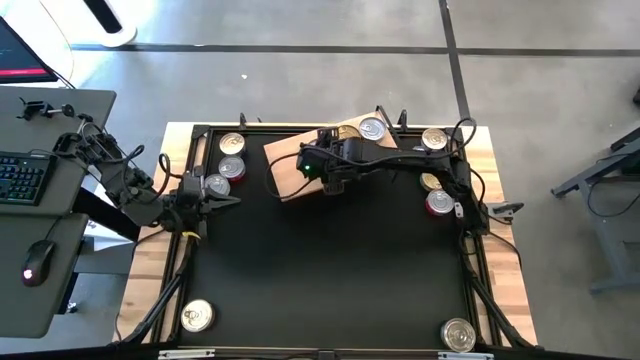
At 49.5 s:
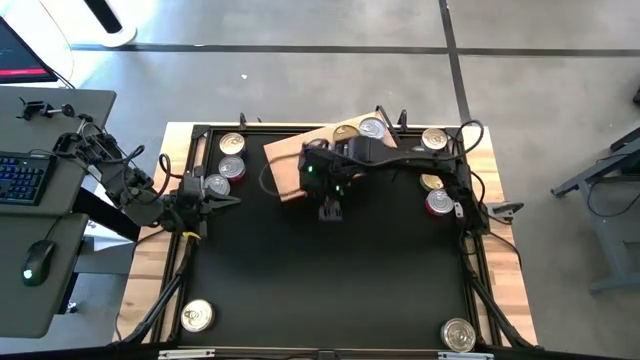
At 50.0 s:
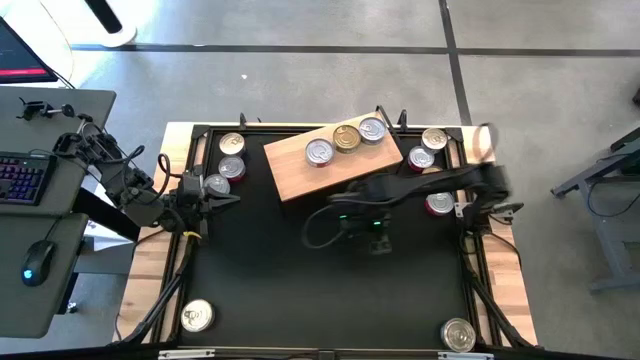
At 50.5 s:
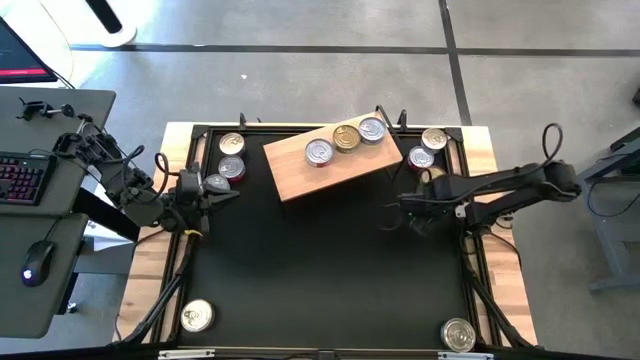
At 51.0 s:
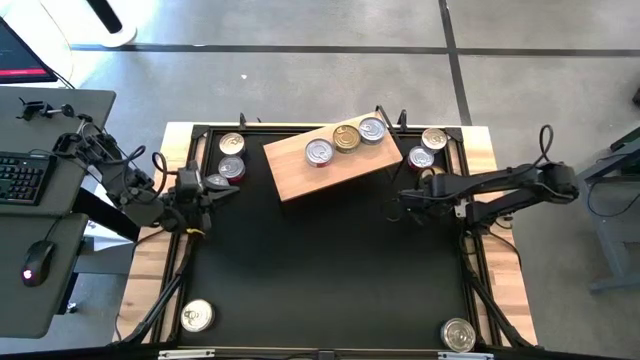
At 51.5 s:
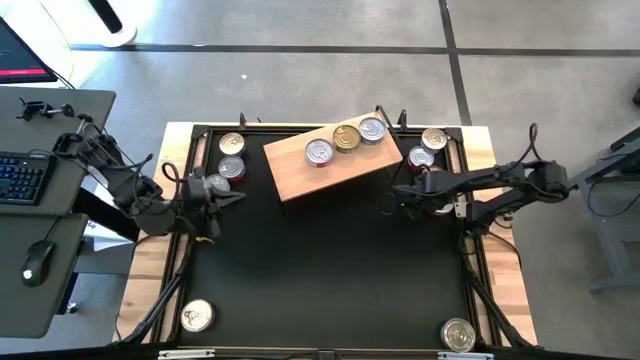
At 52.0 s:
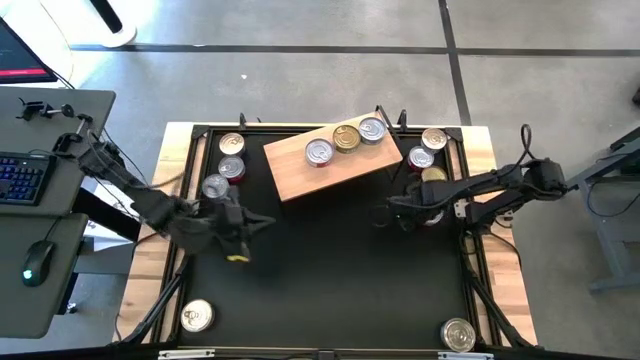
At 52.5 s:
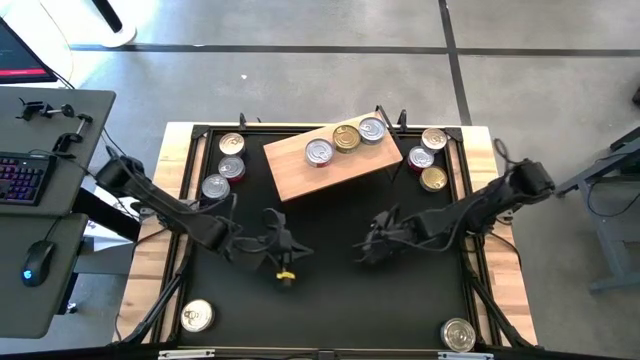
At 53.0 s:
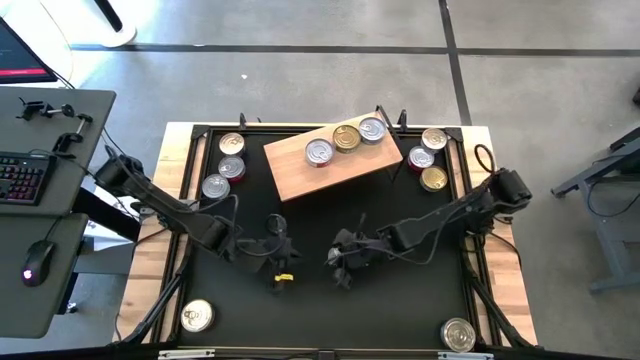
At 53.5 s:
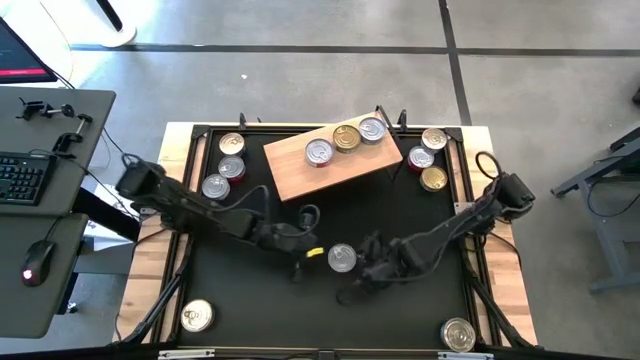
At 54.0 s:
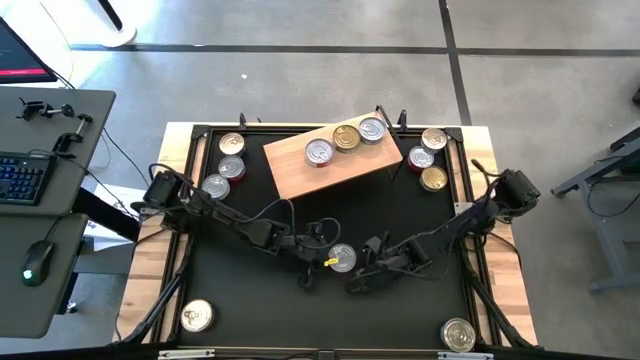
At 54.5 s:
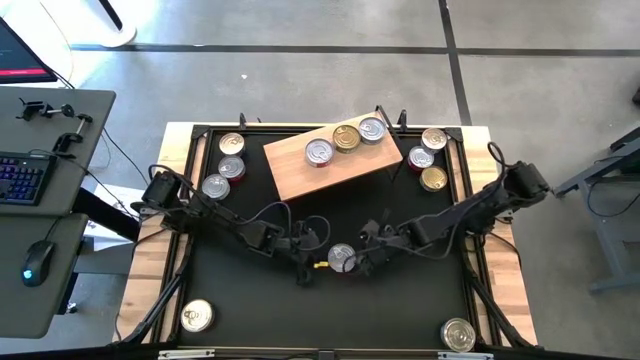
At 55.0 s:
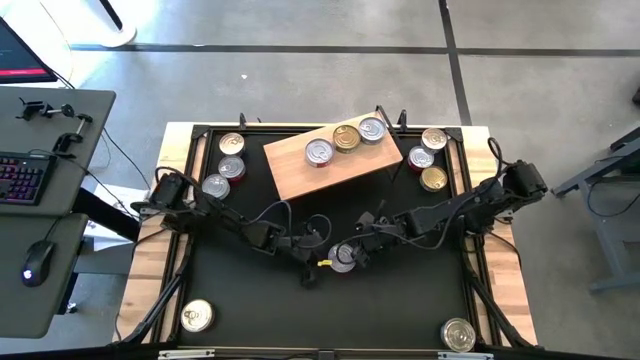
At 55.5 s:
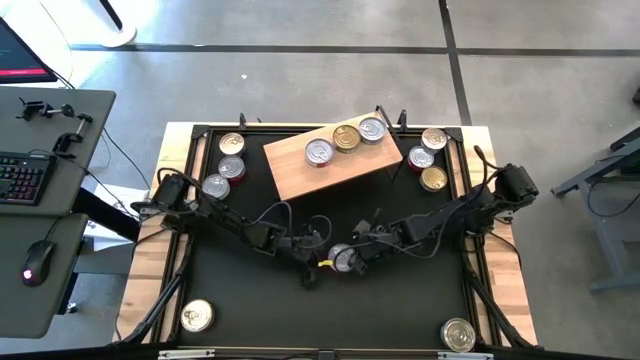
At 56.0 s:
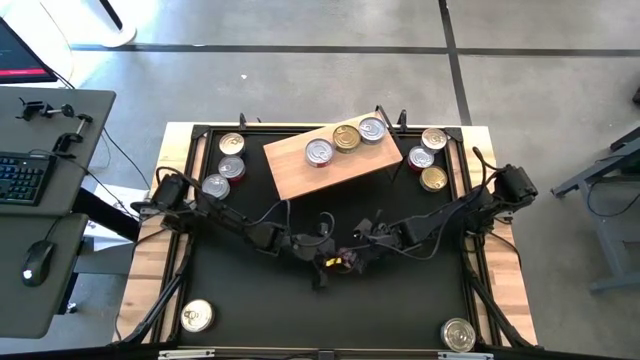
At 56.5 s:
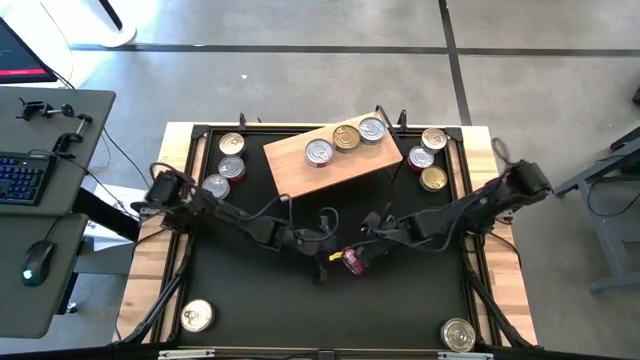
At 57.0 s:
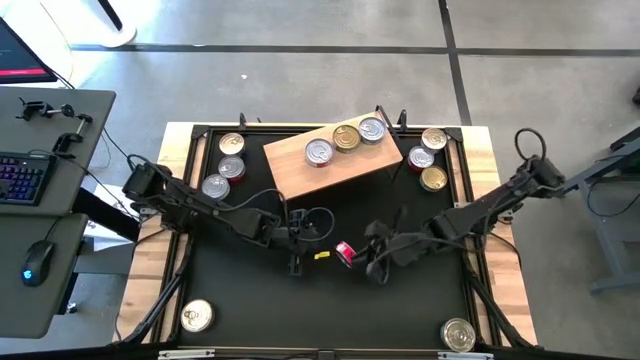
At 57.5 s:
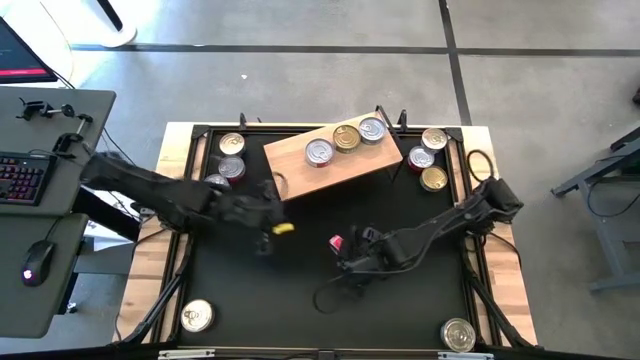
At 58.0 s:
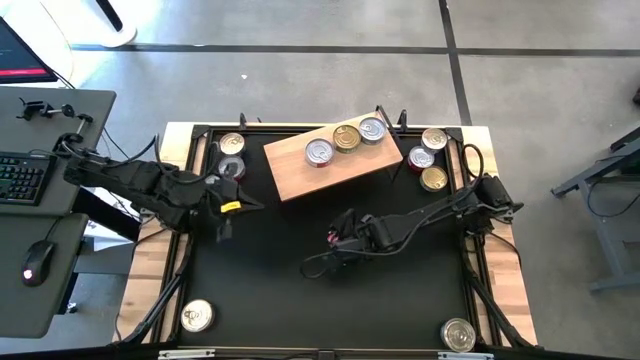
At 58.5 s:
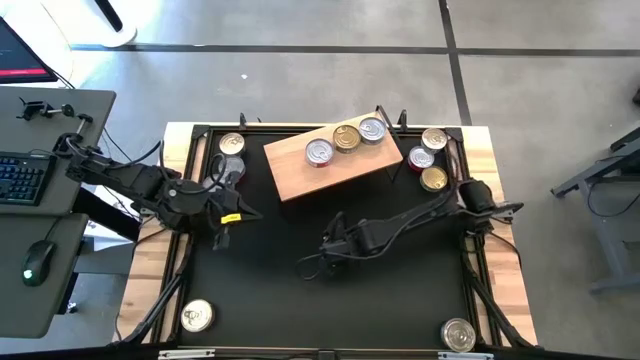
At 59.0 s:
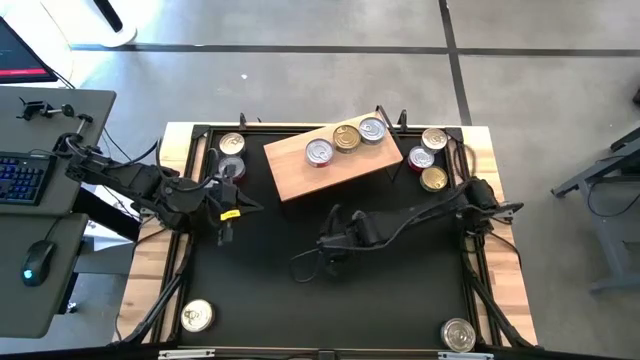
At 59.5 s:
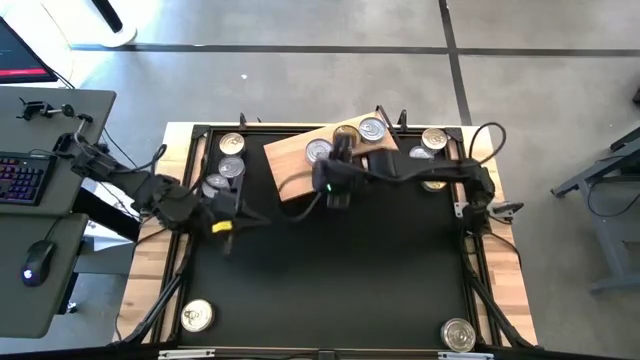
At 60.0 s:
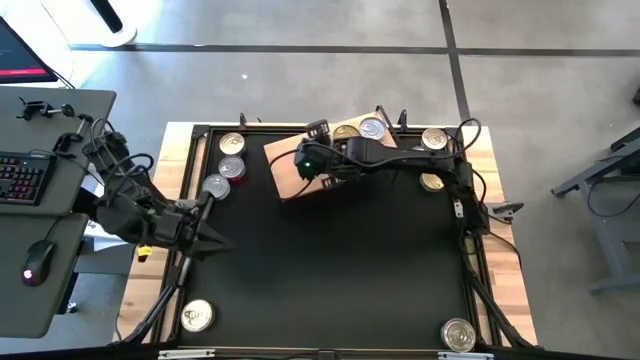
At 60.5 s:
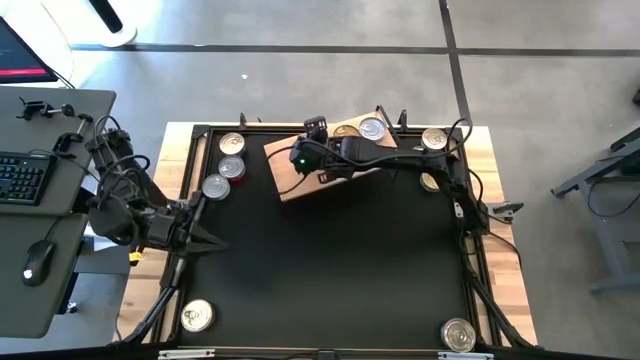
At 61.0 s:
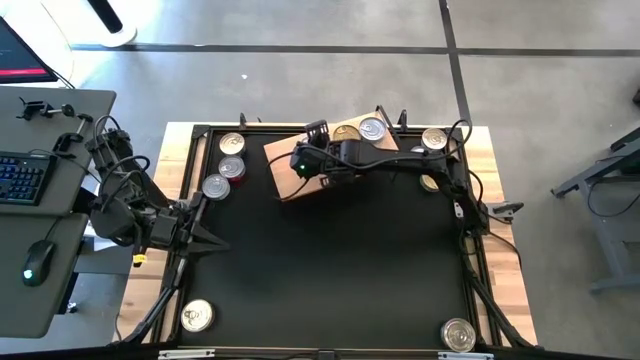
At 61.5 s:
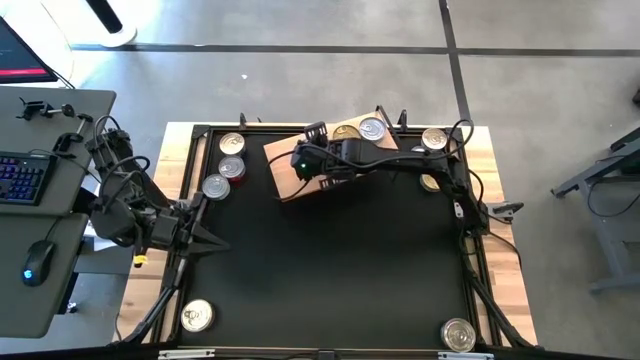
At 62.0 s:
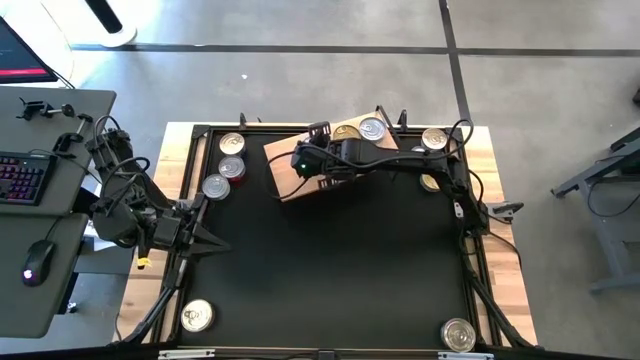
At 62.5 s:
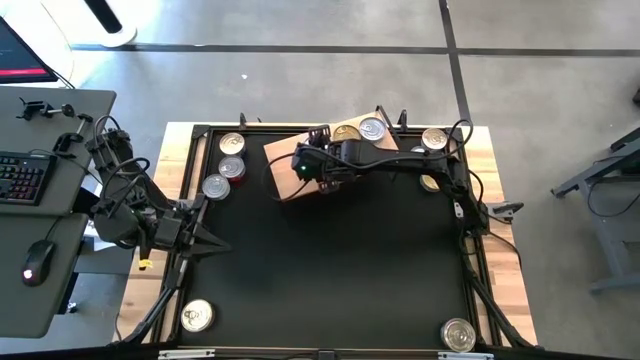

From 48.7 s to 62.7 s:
Task: Stack canned seafood by type on shelf
Stack the bottom right red tuna can on top of the red tuna can on the shelf

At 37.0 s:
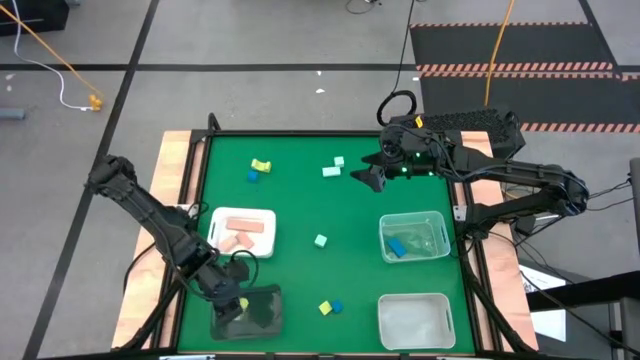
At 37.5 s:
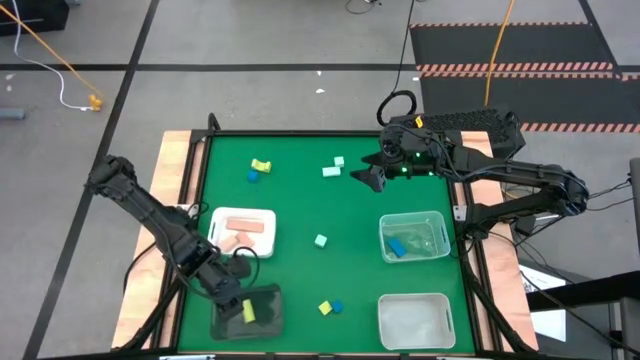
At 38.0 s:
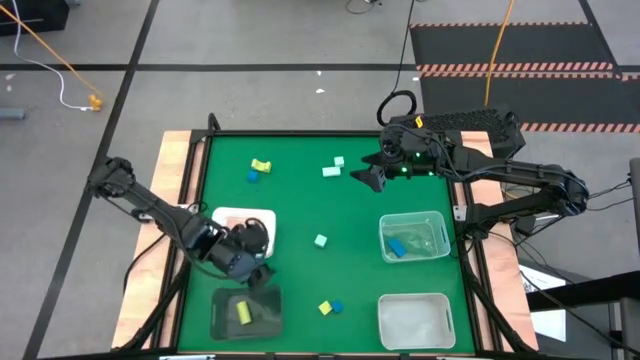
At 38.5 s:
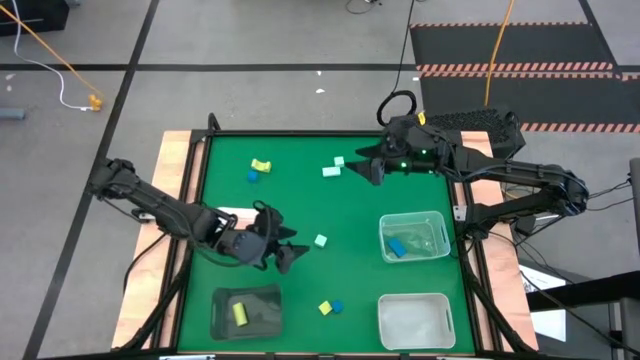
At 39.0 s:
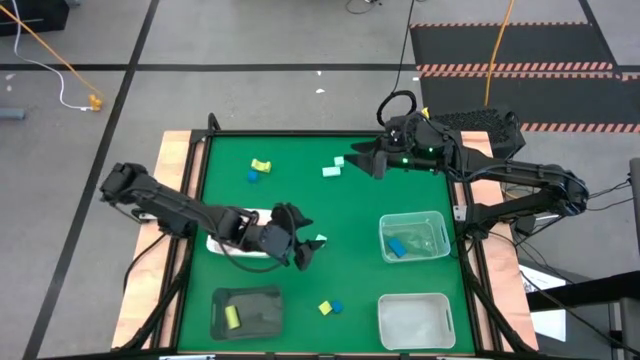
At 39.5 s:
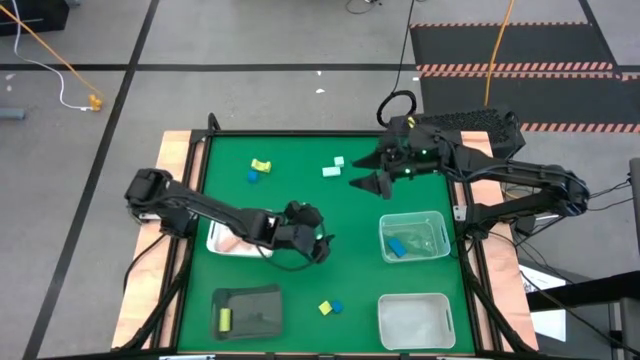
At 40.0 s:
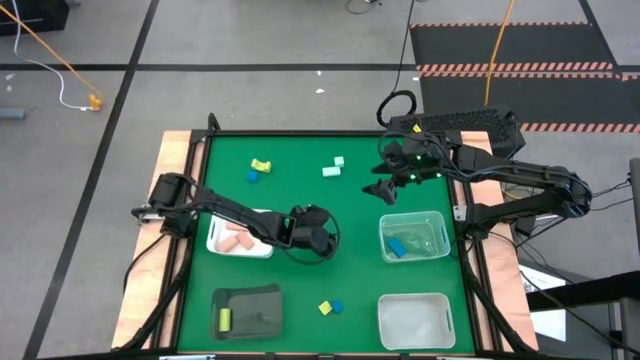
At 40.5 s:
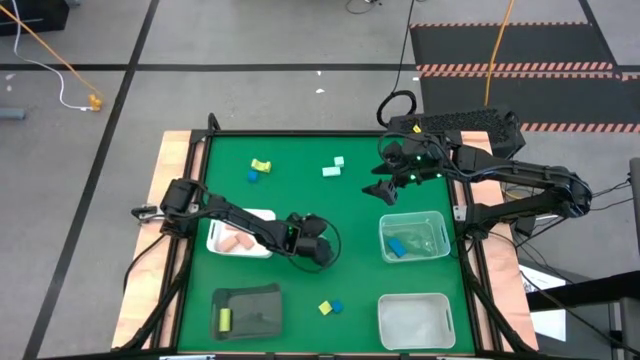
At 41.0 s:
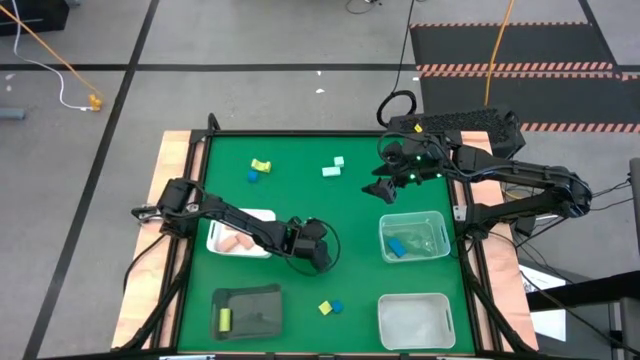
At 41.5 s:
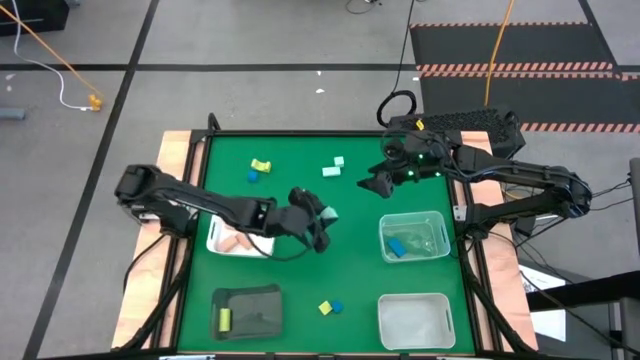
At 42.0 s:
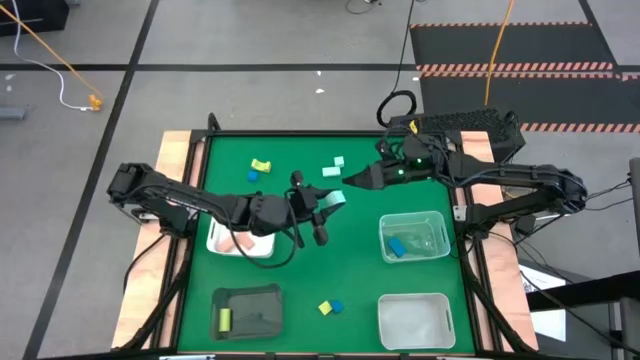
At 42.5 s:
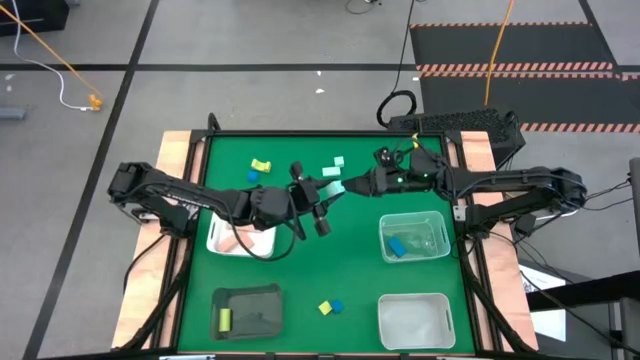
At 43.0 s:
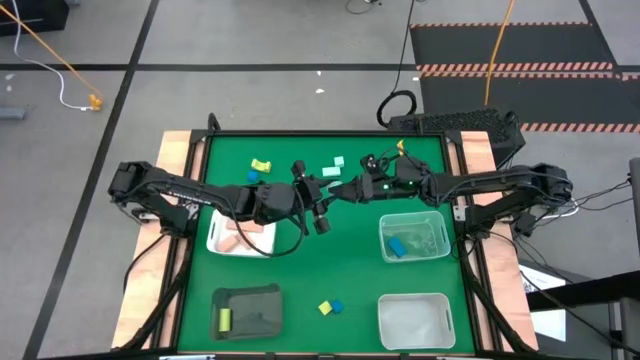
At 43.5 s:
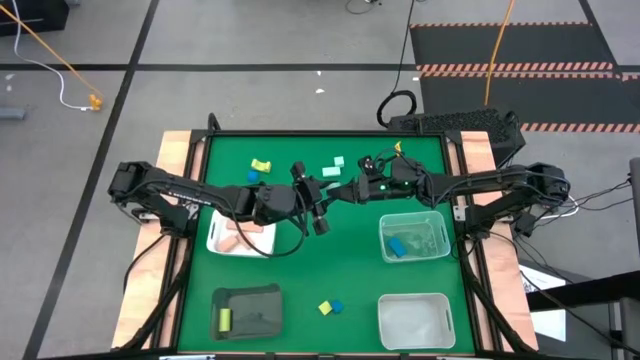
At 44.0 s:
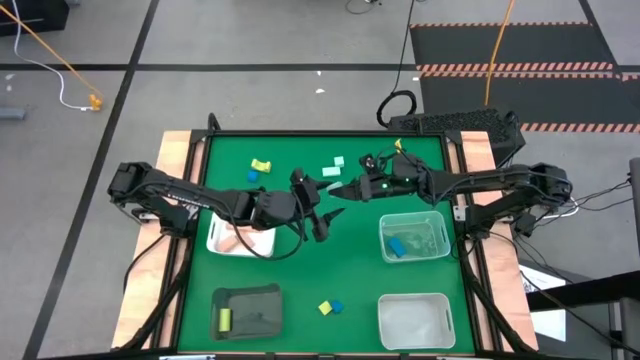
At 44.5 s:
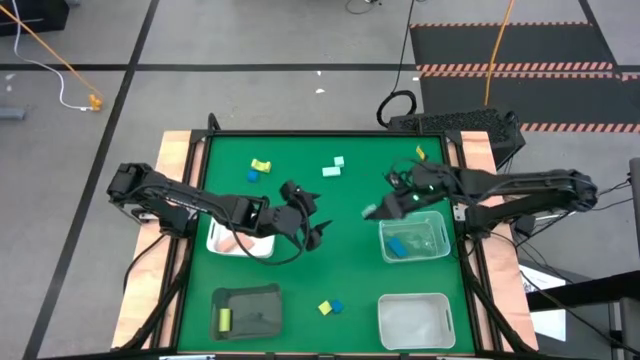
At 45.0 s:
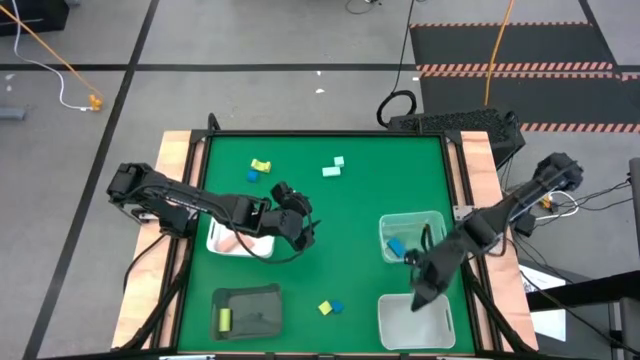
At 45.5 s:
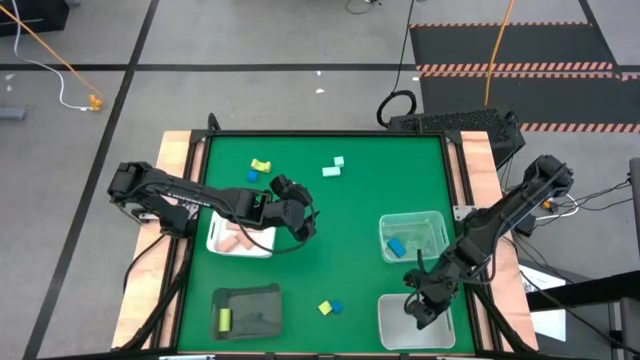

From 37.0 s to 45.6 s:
Task: Sort & place blocks by color
Put the center light blue block into the gray bin
